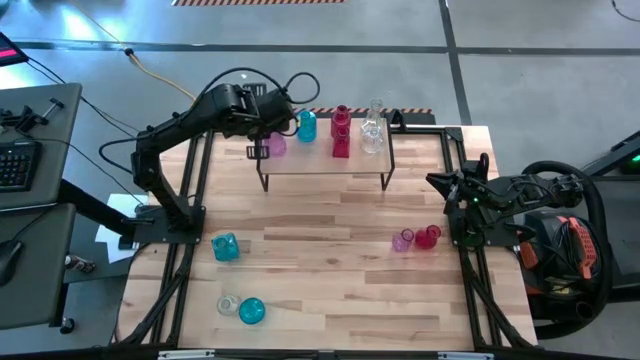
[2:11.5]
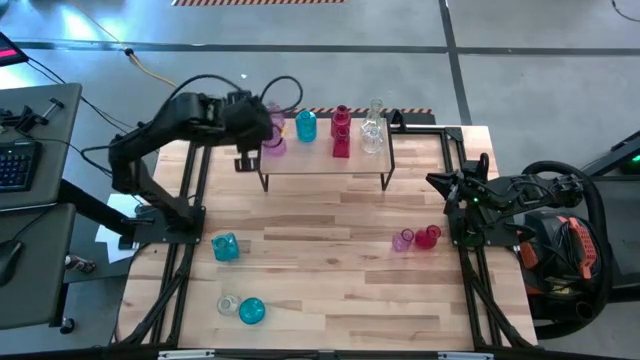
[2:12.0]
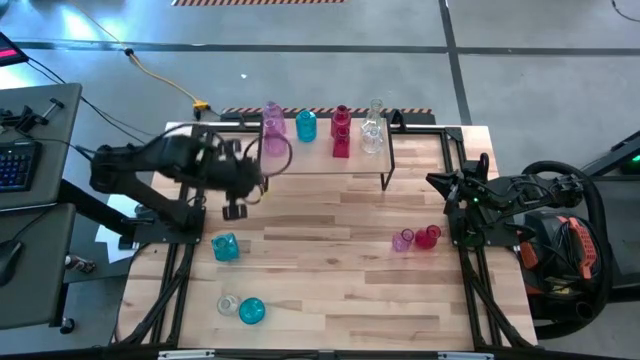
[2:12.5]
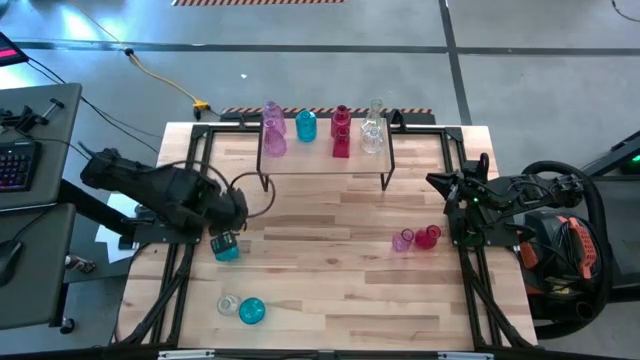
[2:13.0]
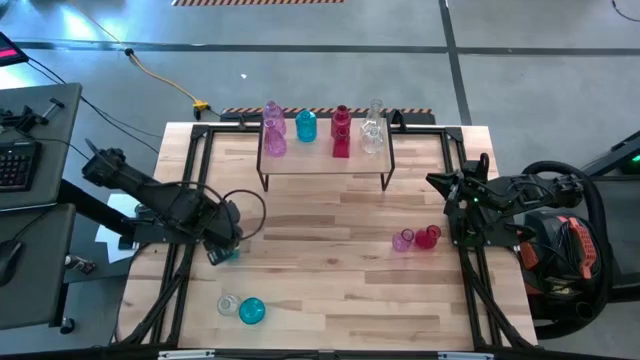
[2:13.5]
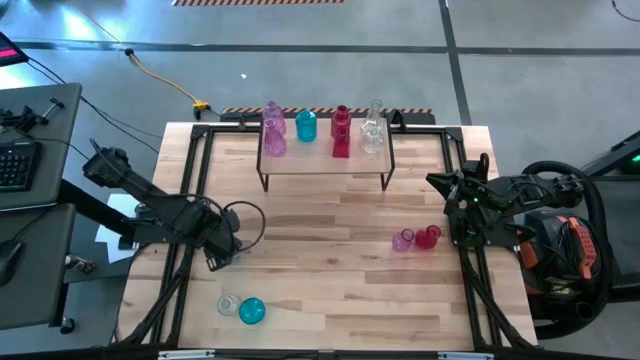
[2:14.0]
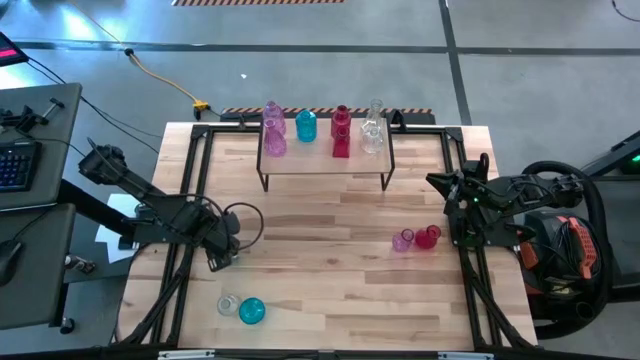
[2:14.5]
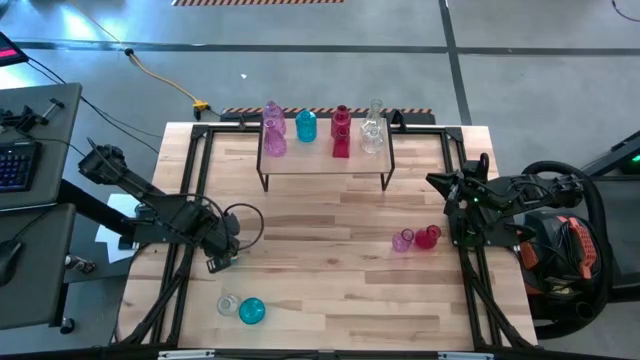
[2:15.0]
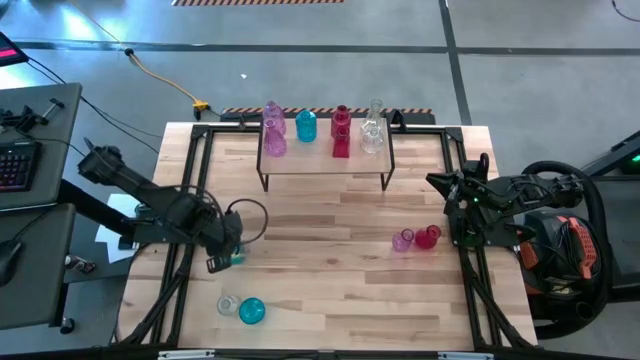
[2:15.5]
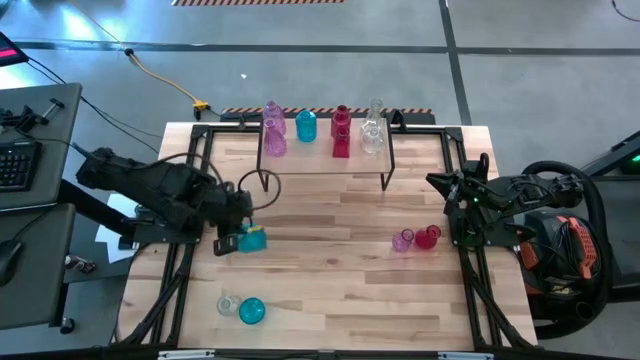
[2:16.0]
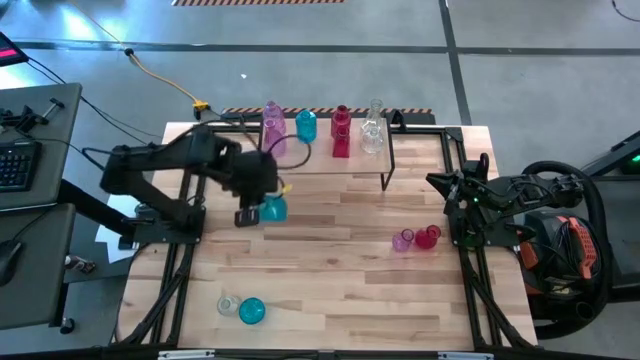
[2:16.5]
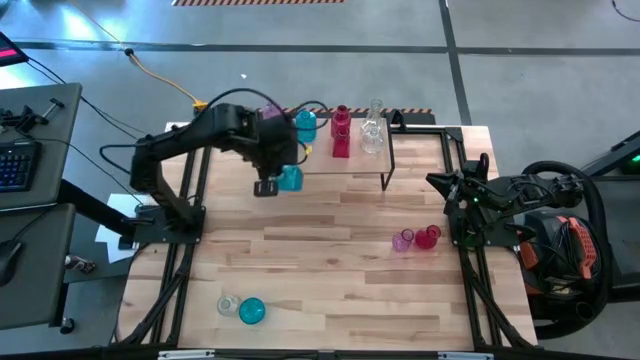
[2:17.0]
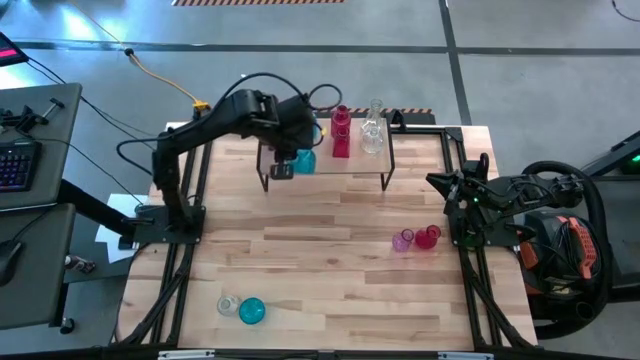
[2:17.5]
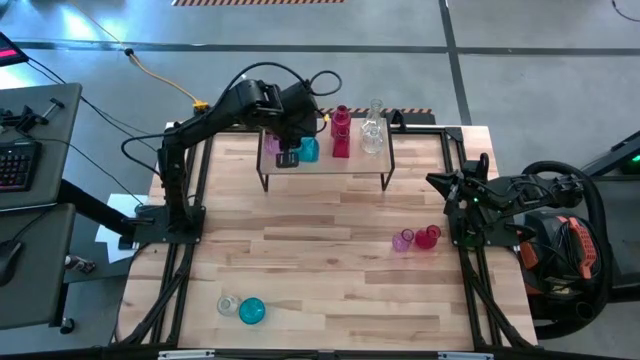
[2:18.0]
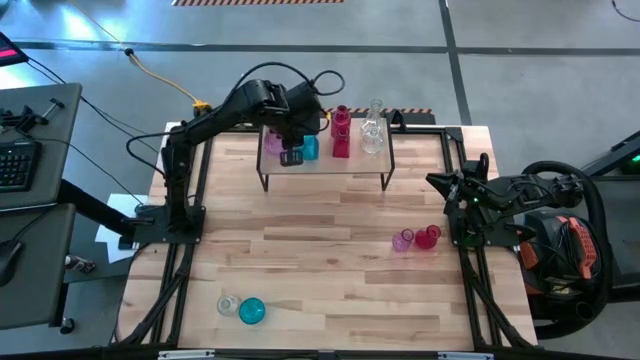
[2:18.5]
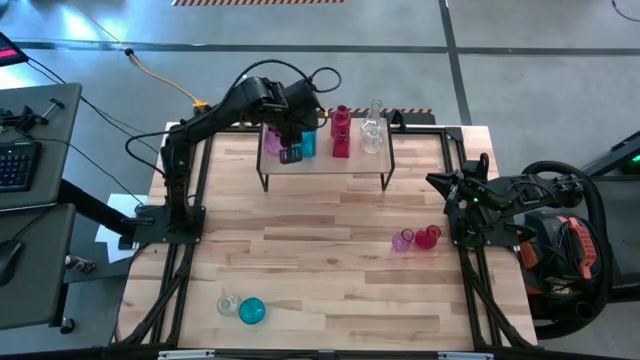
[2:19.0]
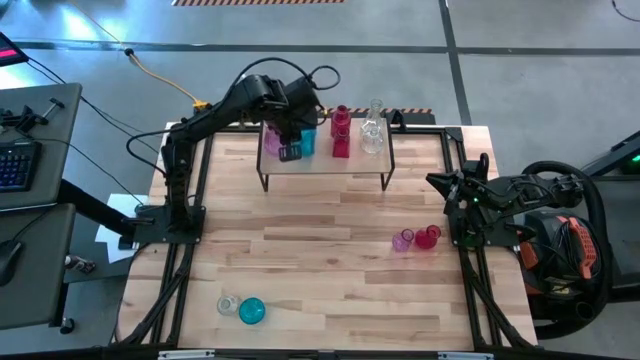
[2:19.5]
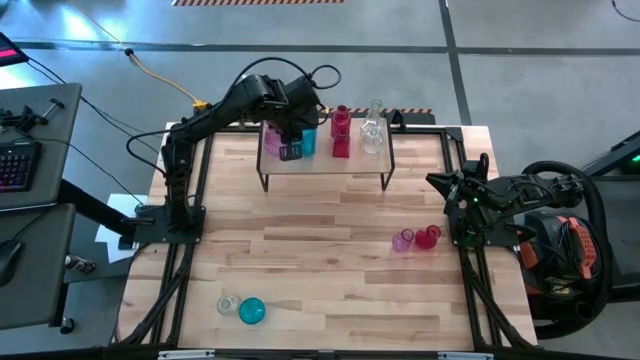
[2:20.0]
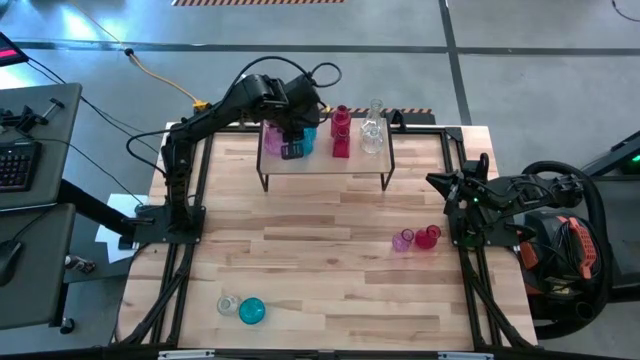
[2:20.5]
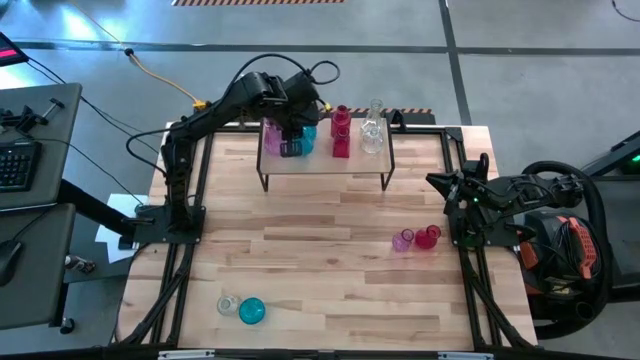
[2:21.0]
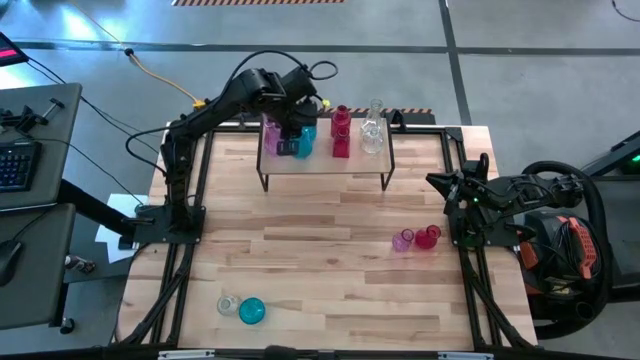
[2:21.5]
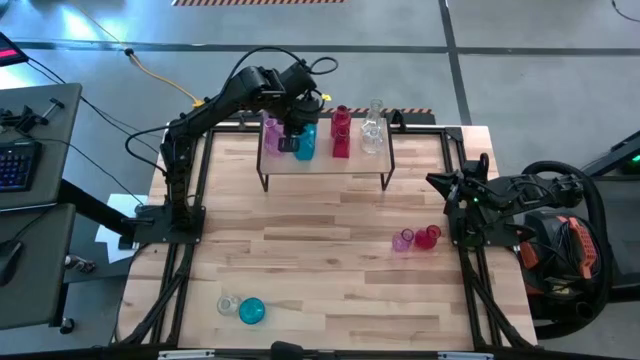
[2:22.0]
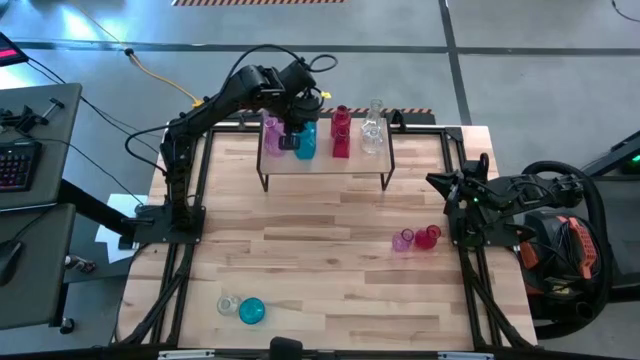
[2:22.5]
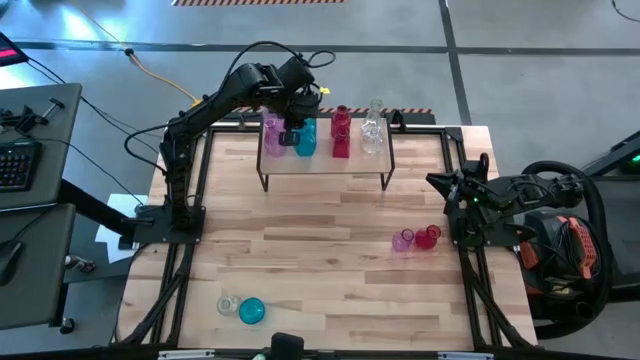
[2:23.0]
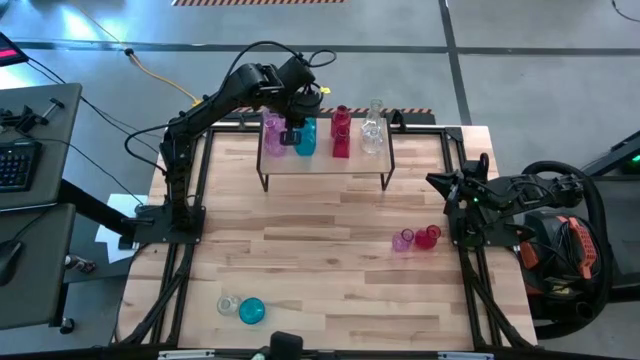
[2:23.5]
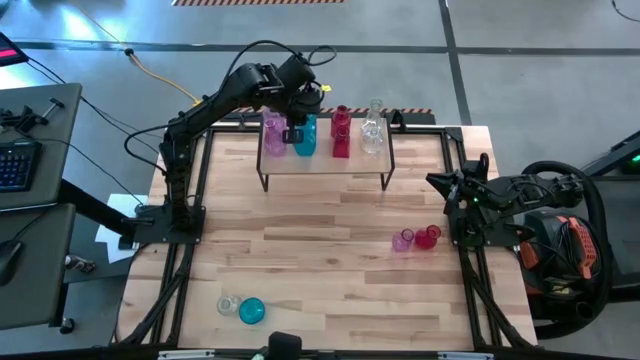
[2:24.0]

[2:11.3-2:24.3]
Task: sort vases onto shelf
Put the top blue vase on the shelf aligned with the other blue vase

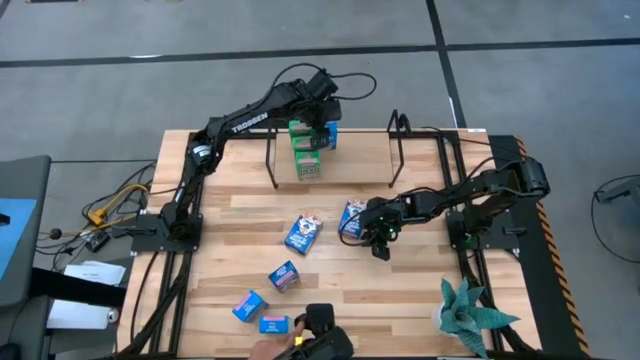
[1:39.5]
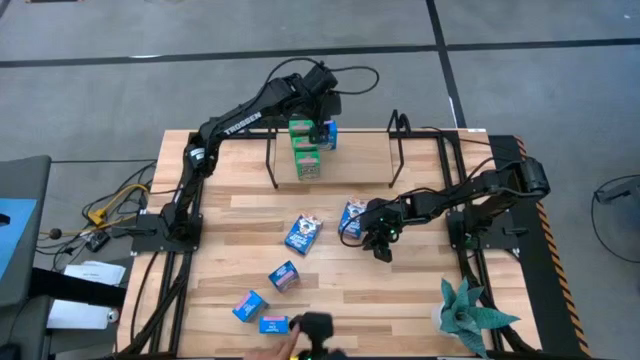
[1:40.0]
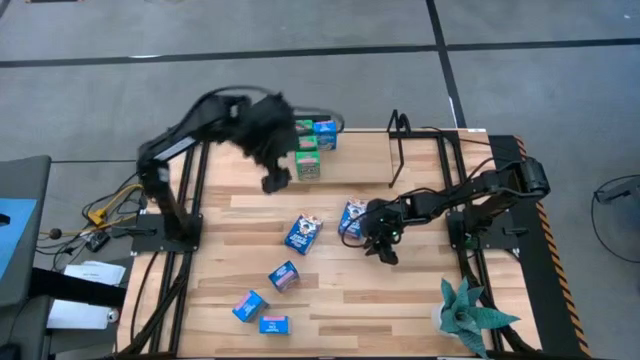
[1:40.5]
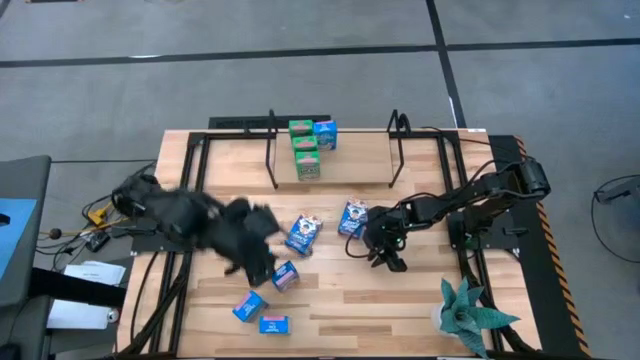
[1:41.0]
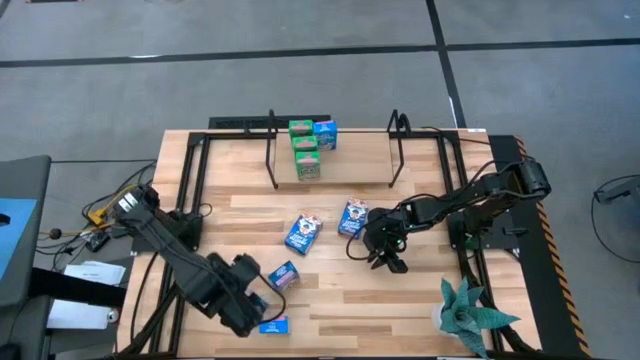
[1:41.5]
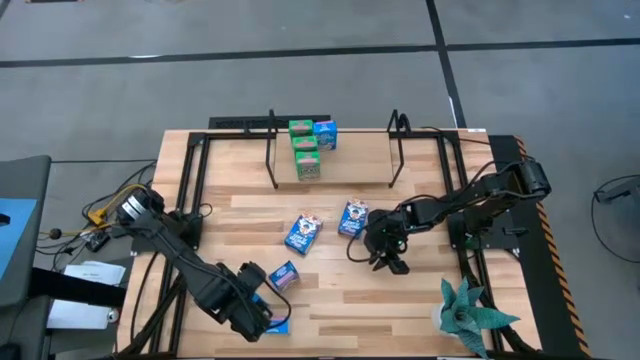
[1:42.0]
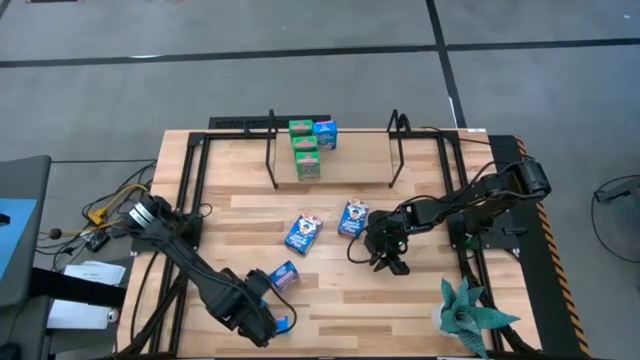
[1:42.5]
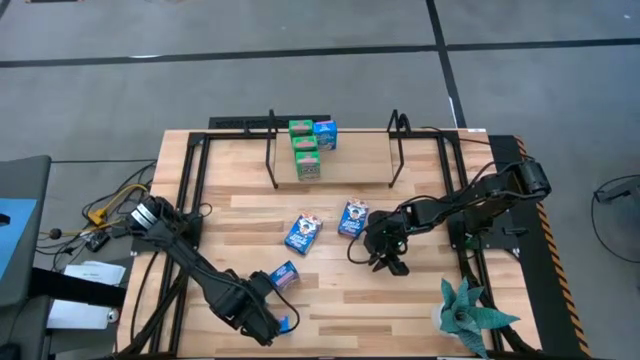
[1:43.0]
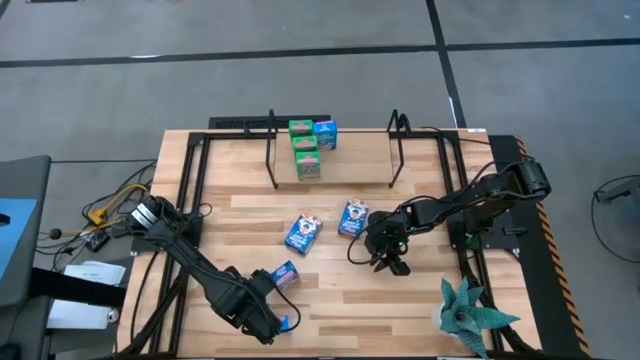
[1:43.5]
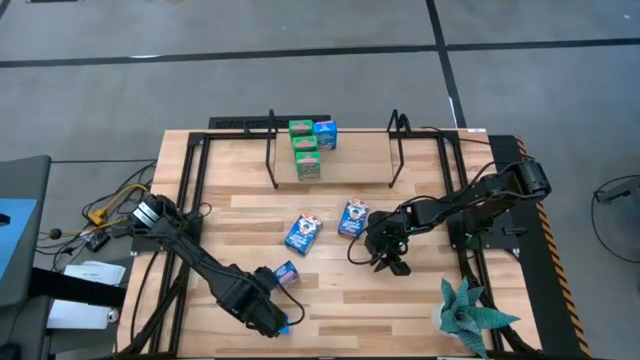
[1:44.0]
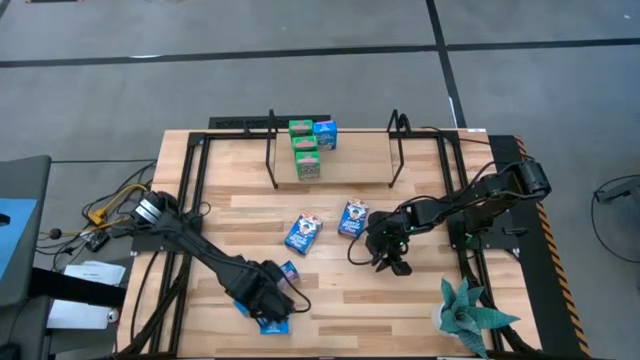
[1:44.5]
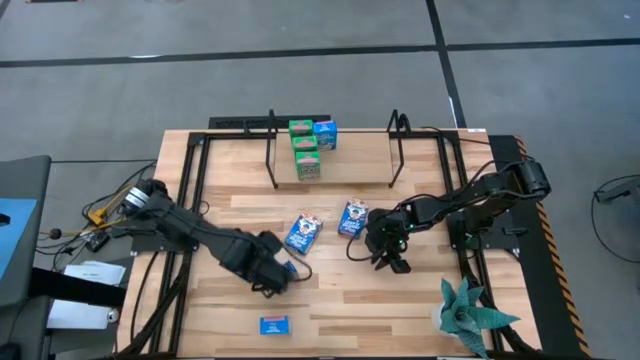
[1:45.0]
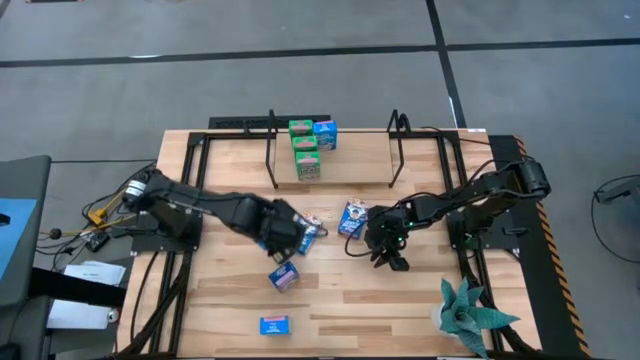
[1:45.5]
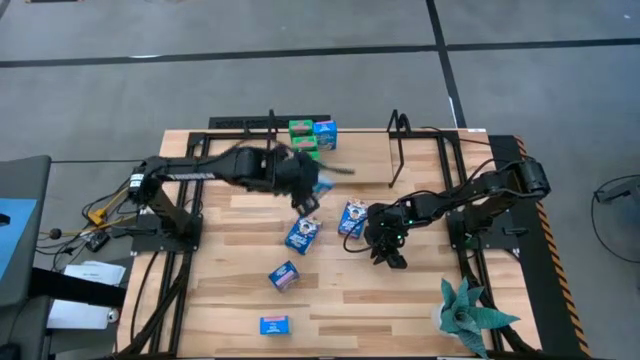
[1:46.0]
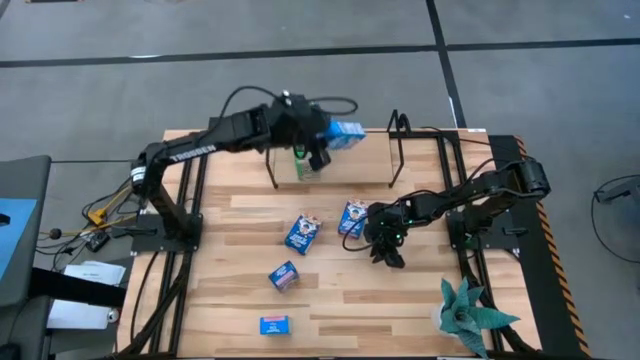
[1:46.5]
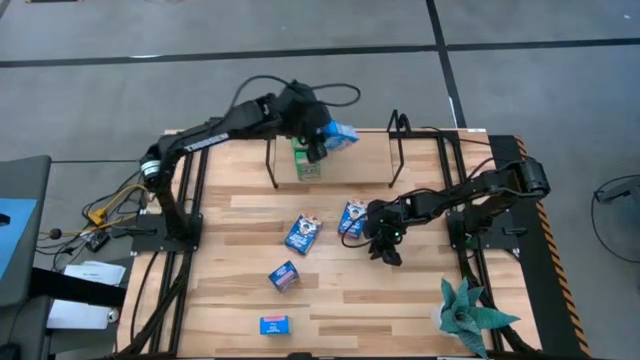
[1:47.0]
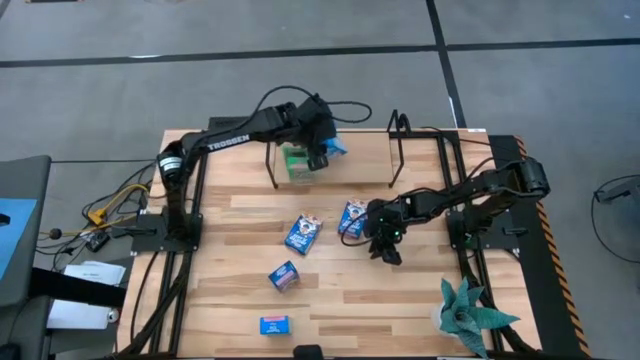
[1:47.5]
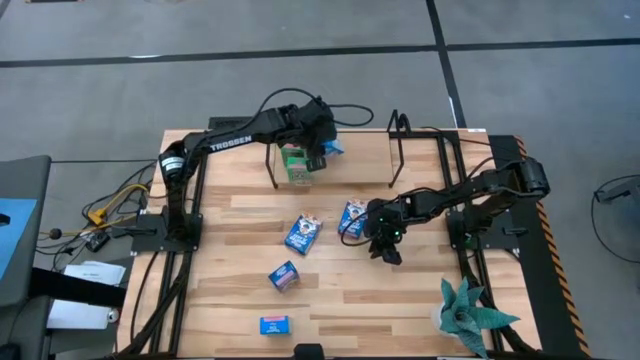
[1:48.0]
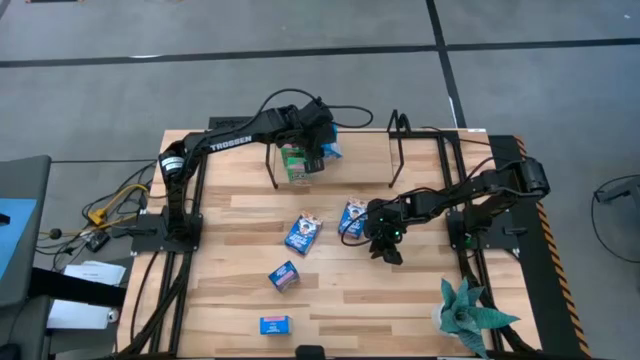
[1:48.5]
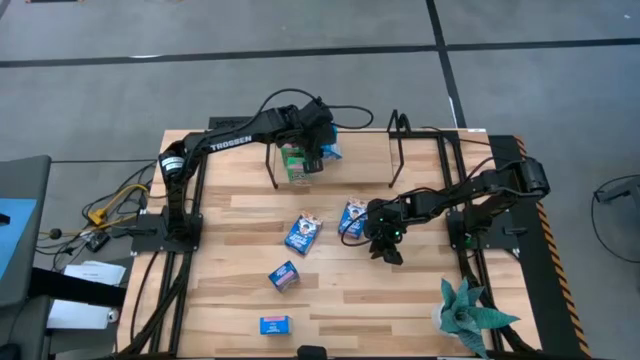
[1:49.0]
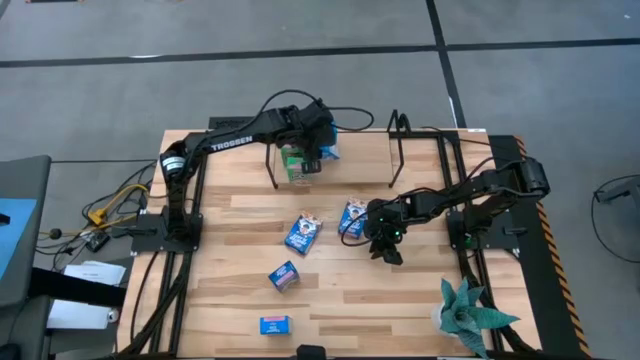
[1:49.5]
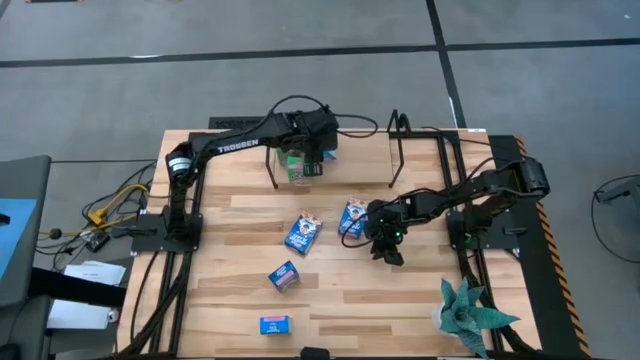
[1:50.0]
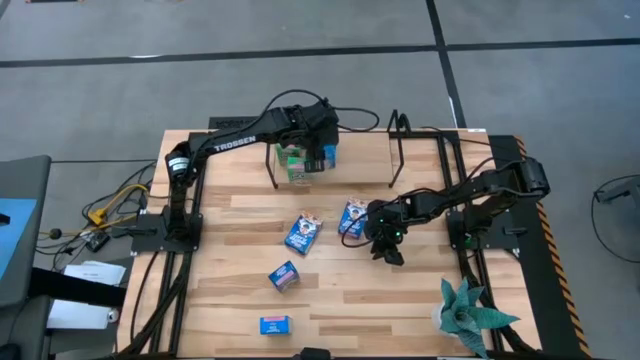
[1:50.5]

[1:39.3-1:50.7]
Task: Stack cereal on shelf
Put the left light blue cereal box on the shelf aligned with the other light blue cereal box
